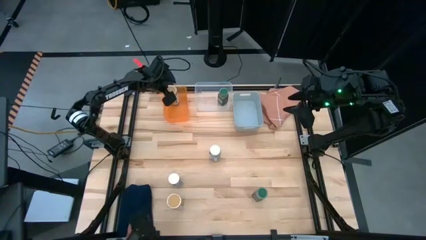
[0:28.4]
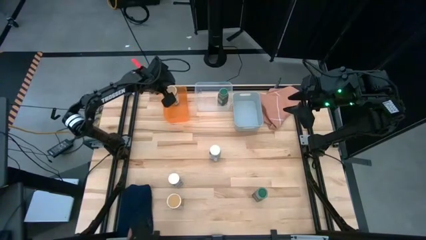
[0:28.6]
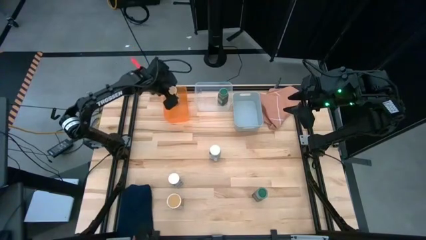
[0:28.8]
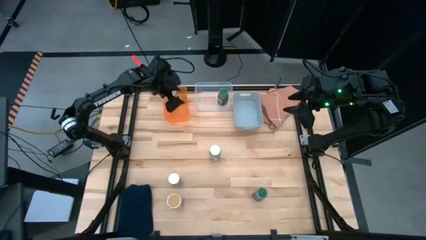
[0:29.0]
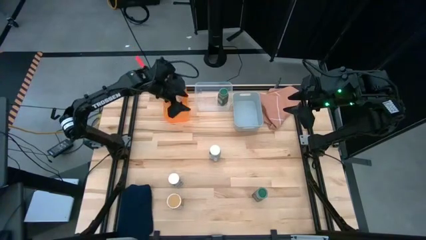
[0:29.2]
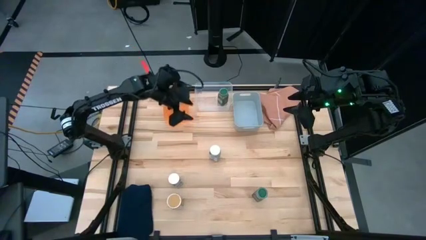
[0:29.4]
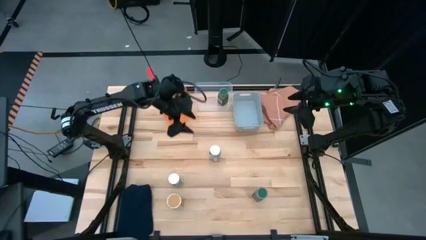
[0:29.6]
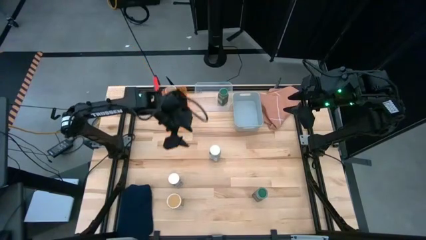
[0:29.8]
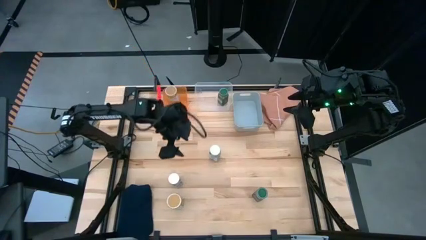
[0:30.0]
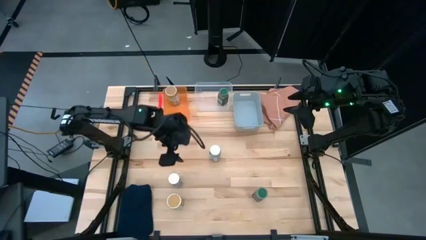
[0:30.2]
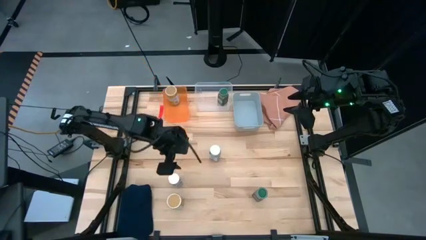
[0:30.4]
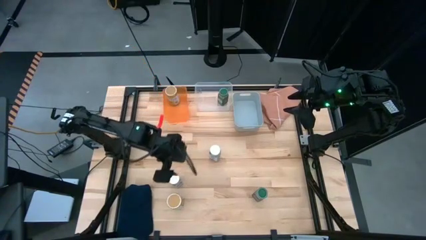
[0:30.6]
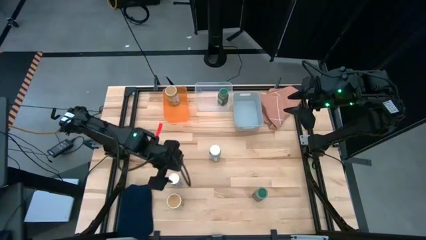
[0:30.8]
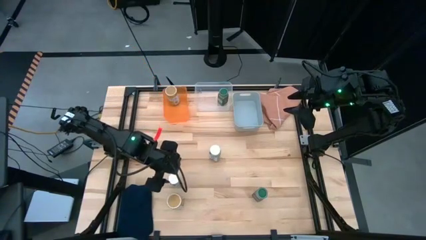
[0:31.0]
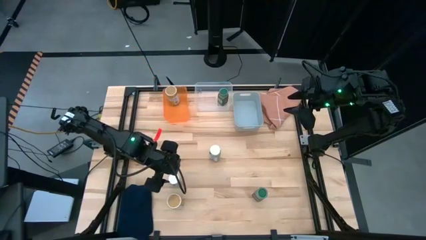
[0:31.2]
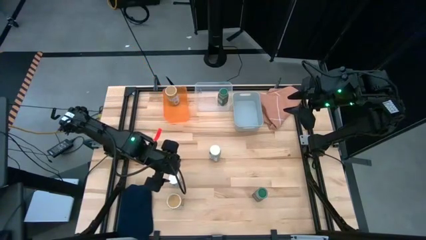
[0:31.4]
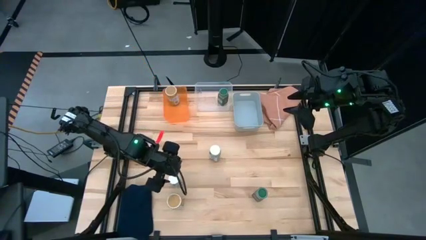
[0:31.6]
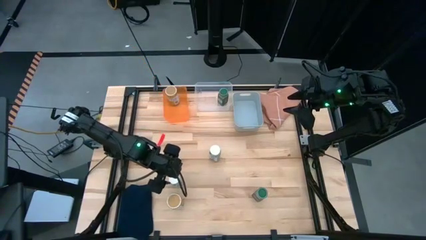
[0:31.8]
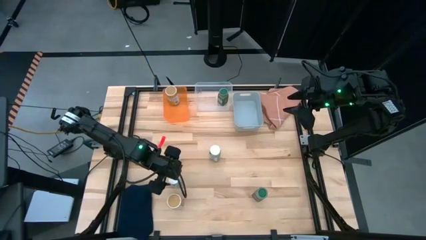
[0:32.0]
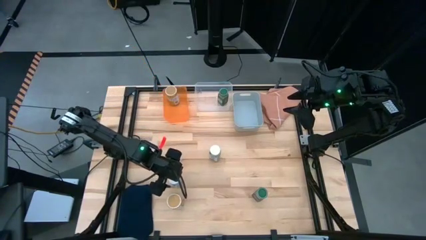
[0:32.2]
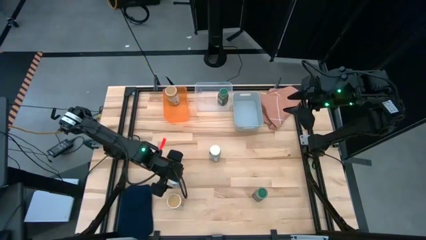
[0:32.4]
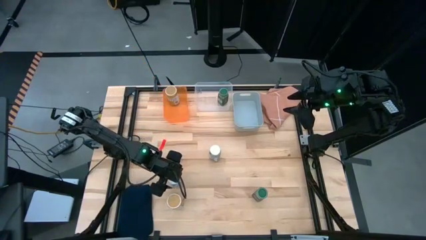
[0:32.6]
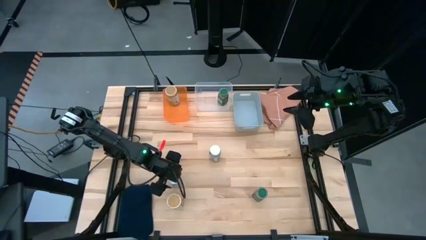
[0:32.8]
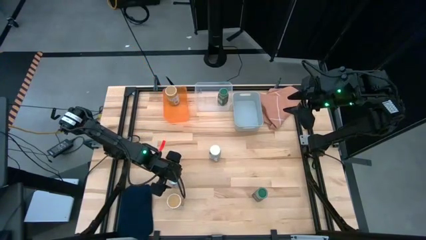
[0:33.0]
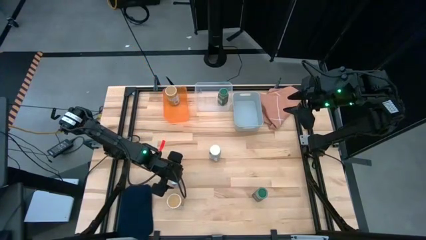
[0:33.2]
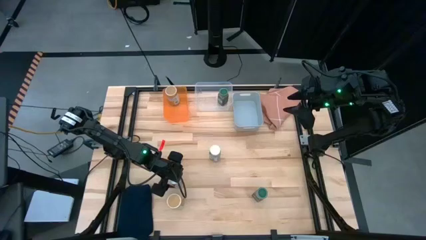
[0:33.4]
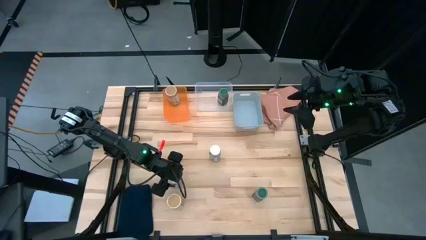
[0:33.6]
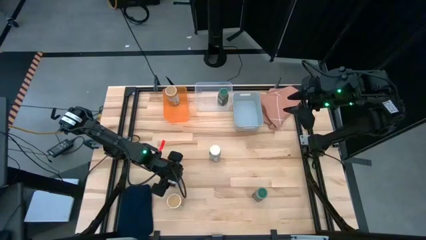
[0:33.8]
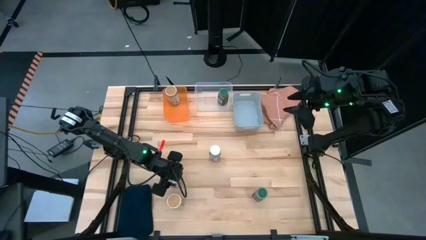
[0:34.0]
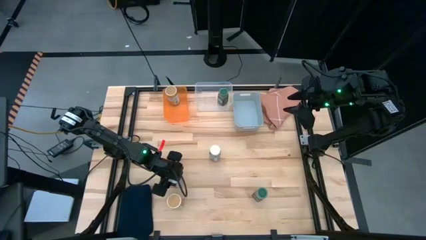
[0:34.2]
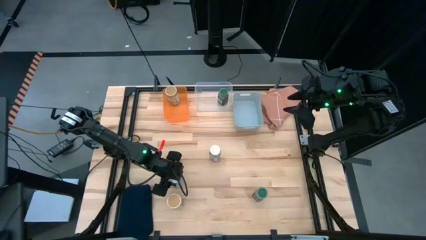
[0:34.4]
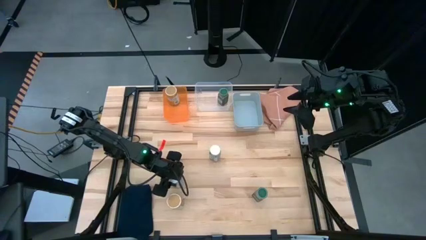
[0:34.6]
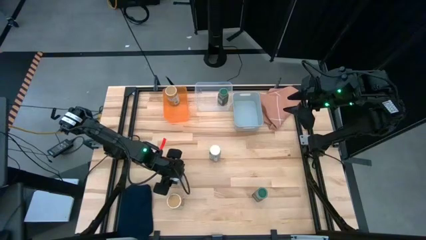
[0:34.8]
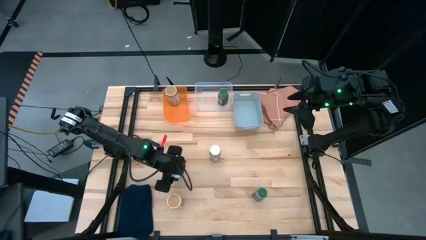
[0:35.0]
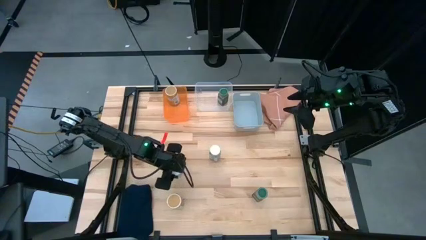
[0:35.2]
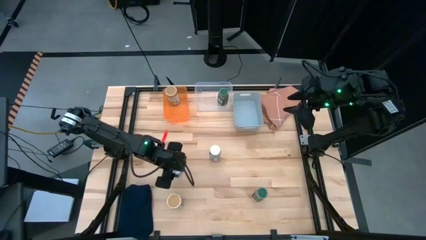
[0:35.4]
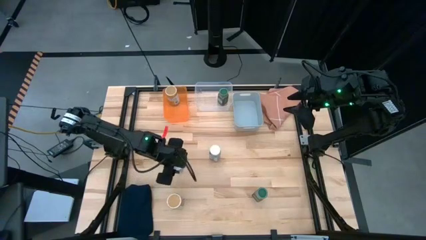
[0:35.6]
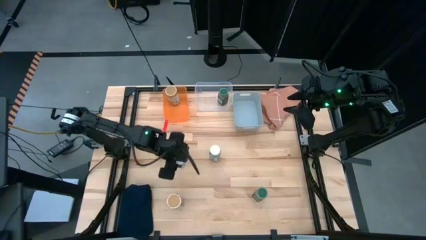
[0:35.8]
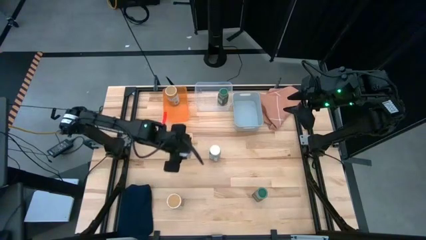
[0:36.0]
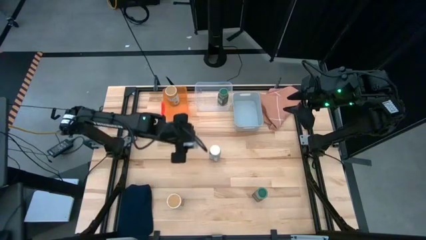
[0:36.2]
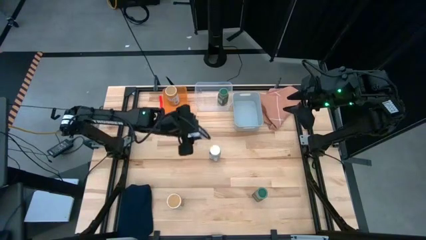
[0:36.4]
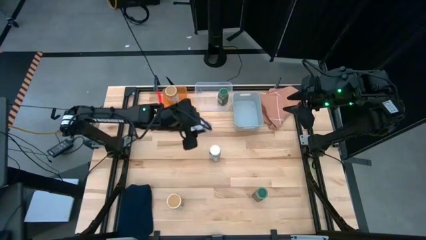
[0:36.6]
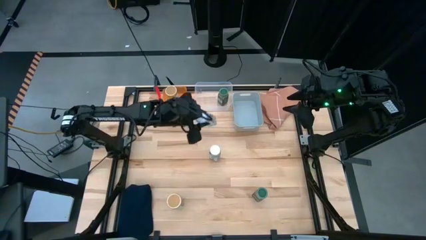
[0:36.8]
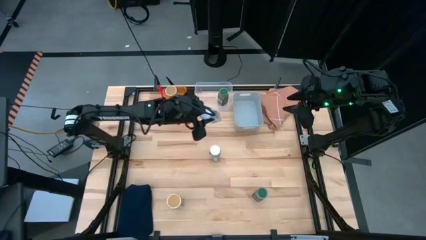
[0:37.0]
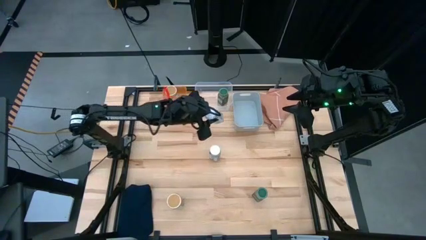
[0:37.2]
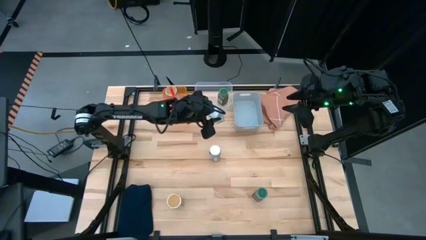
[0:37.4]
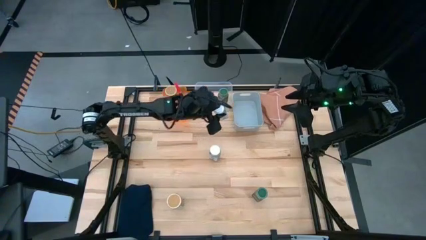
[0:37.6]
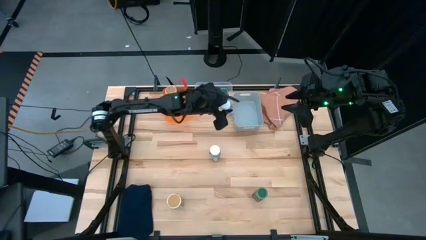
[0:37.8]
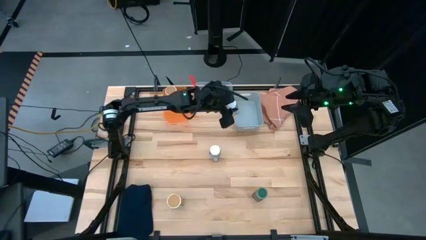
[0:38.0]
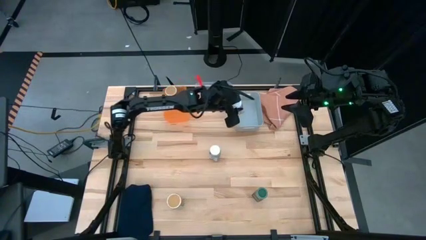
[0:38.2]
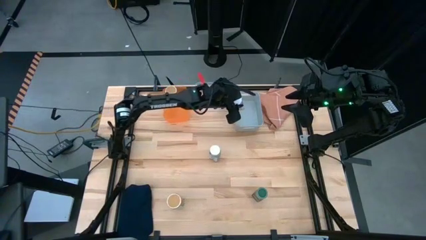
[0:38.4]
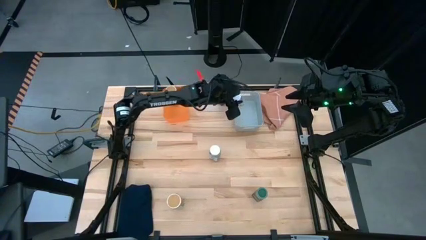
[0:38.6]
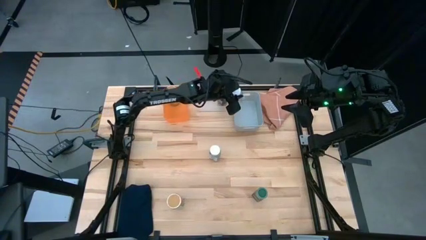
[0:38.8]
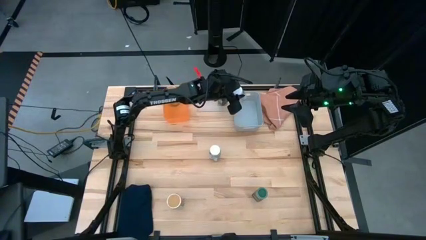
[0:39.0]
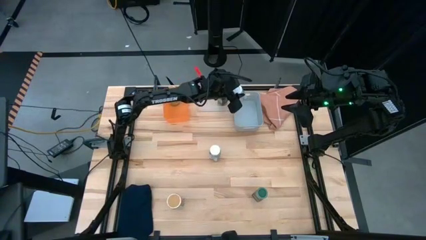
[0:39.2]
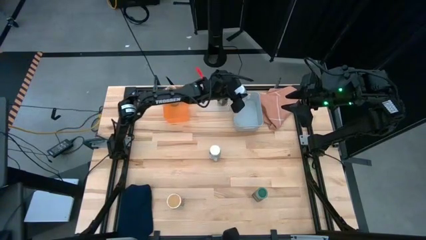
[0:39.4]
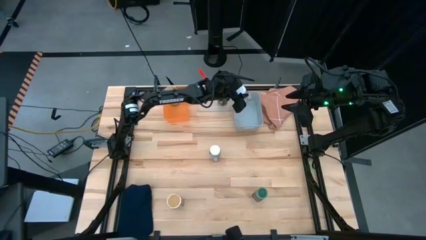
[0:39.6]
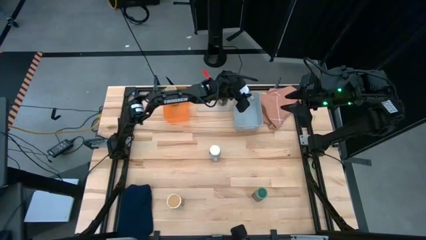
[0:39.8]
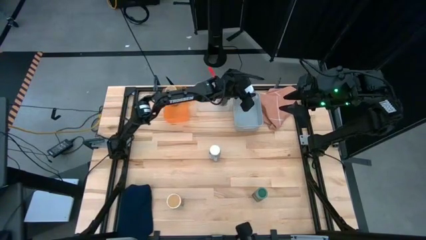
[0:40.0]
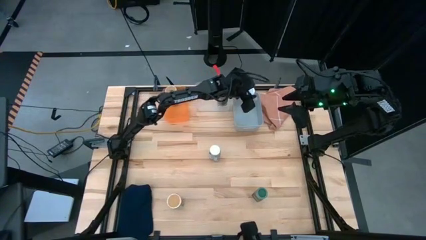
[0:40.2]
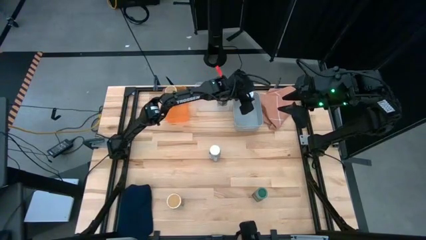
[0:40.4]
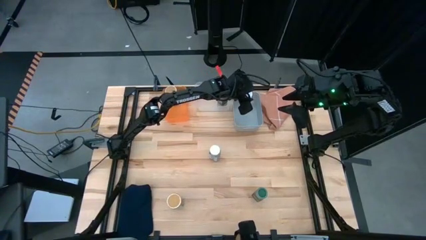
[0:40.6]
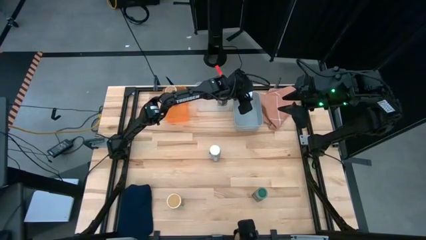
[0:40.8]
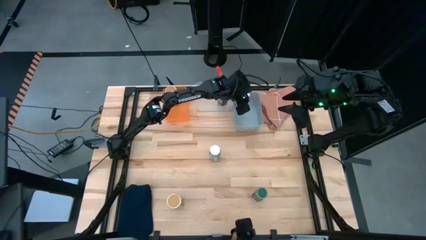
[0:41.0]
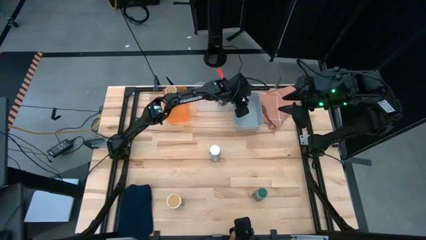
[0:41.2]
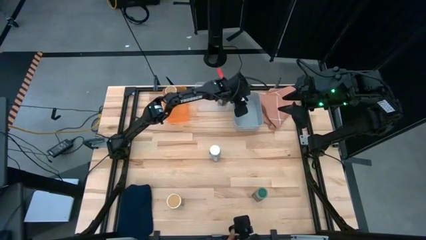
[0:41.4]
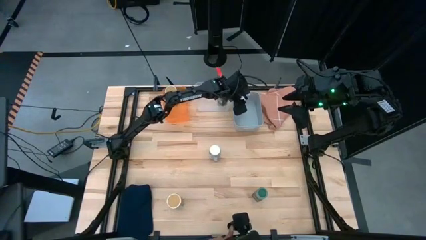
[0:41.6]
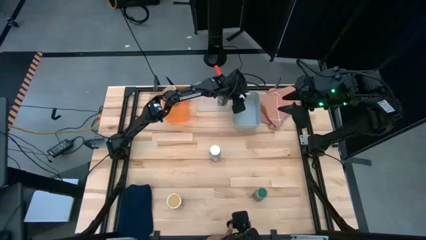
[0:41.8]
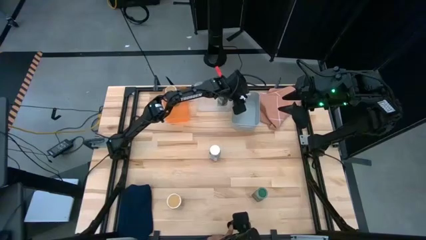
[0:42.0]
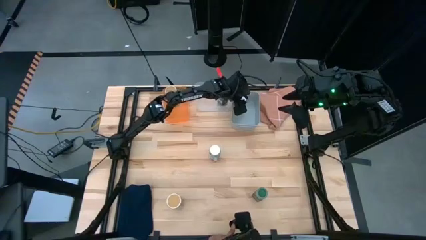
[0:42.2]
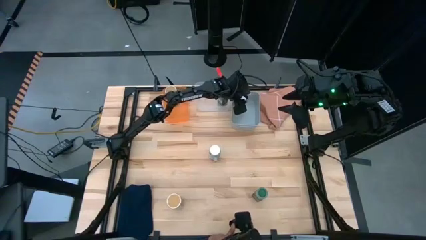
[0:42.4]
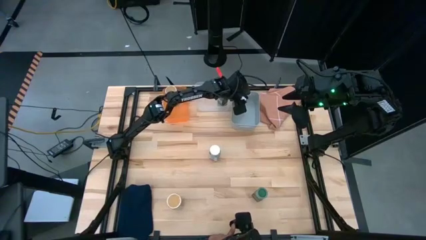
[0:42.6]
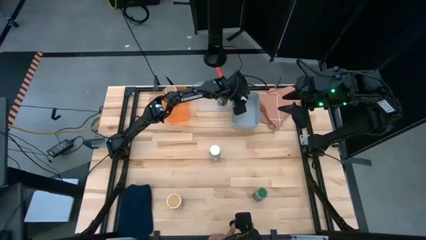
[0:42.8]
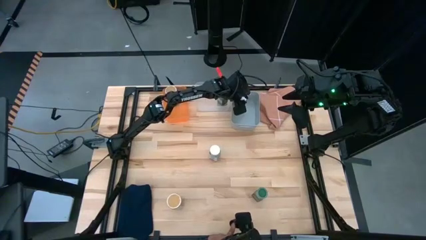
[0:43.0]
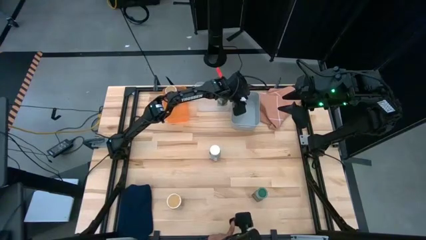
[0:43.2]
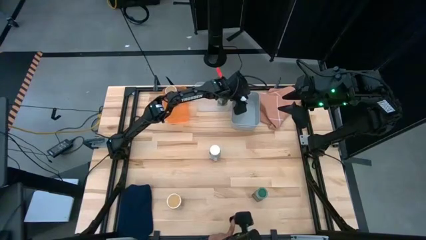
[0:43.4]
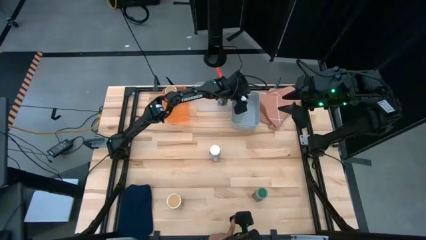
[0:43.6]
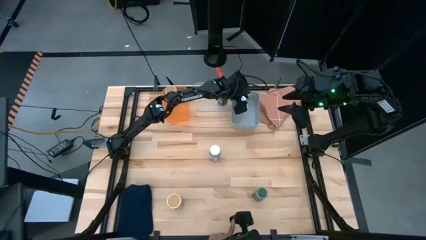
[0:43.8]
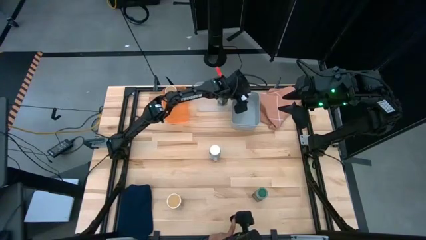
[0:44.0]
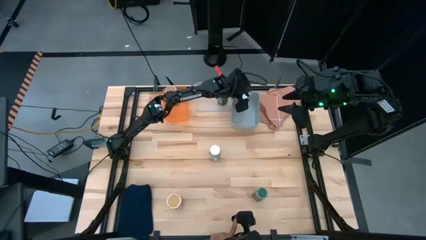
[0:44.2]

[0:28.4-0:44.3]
Task: Sort spices by type
Put the bottom white seasoning bottle into the gray bin

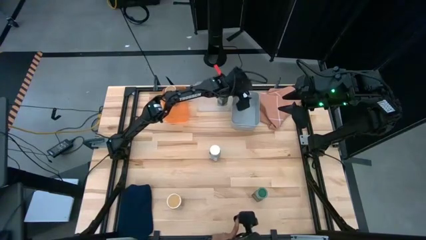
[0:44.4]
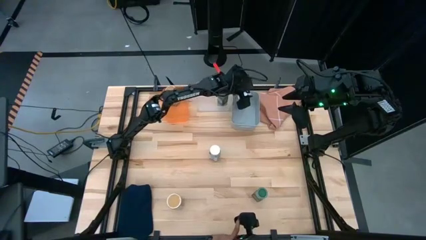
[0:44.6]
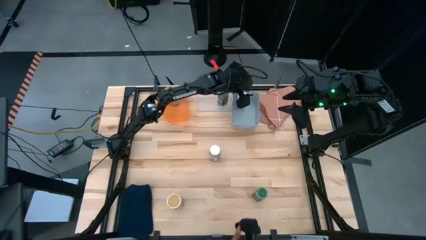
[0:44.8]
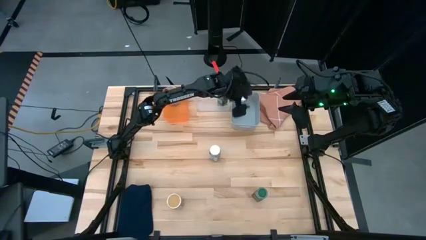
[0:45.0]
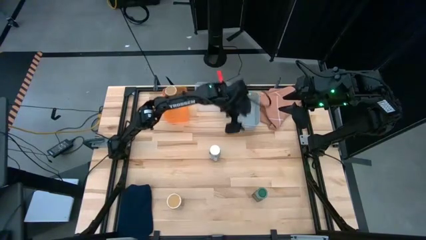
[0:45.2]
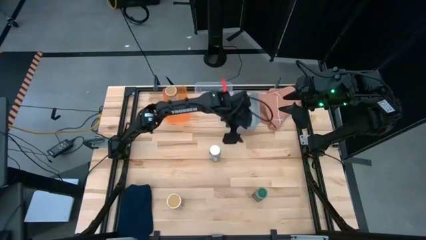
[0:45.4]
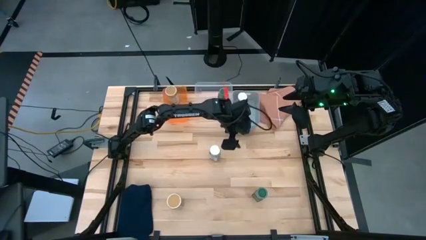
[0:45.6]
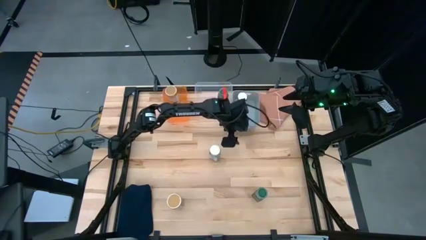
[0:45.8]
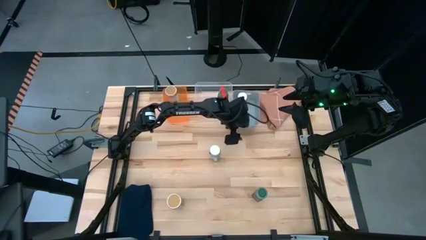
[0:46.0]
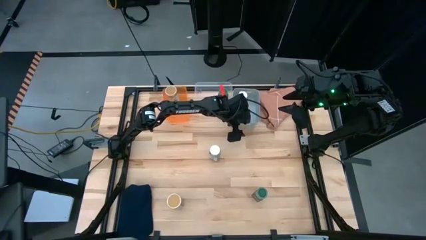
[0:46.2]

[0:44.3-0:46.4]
Adjust the gray bin
